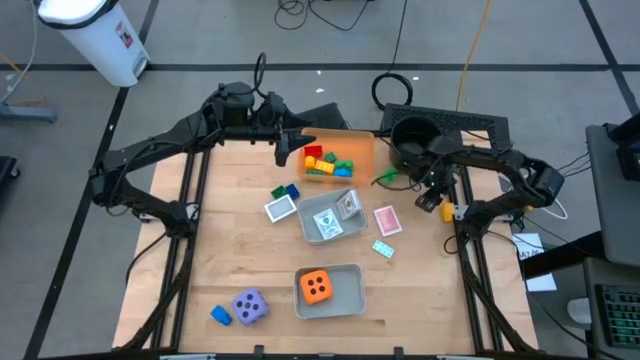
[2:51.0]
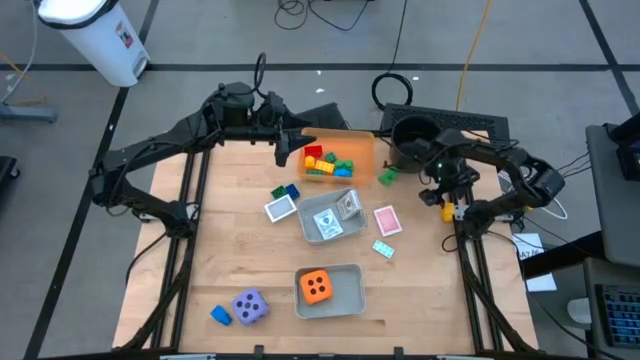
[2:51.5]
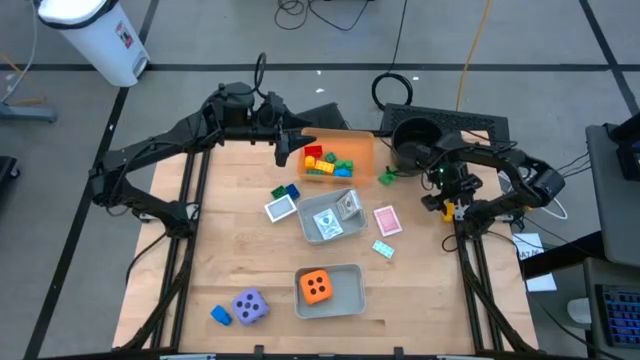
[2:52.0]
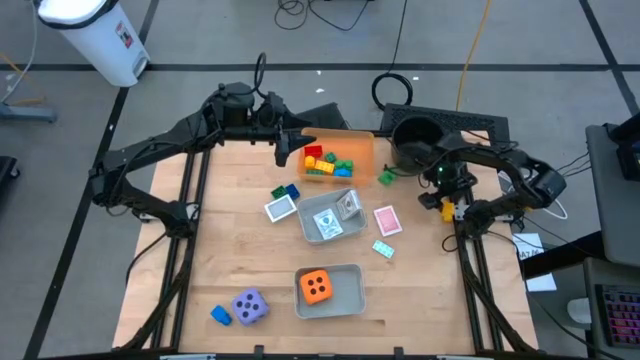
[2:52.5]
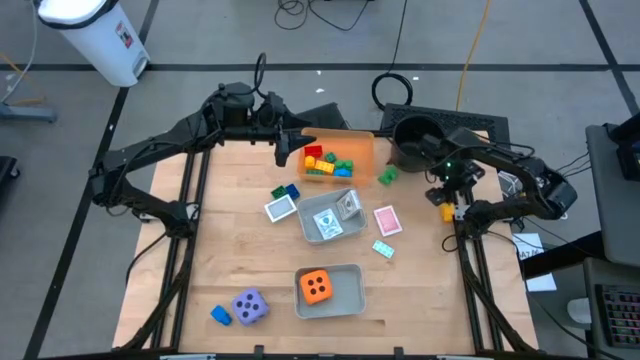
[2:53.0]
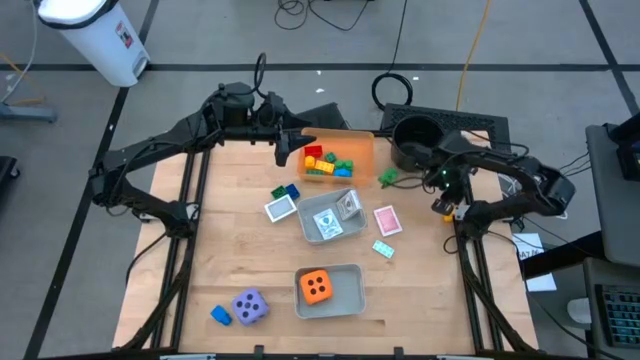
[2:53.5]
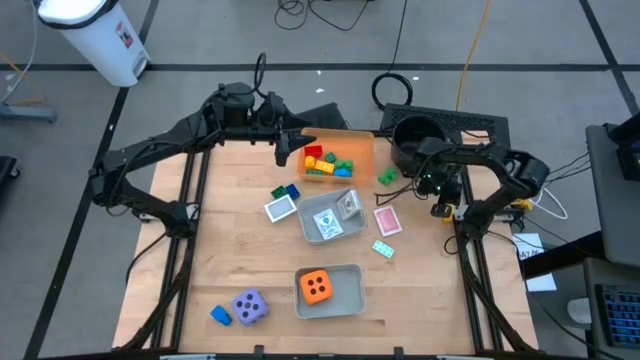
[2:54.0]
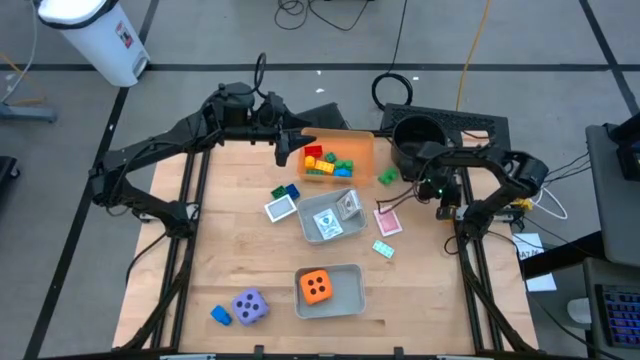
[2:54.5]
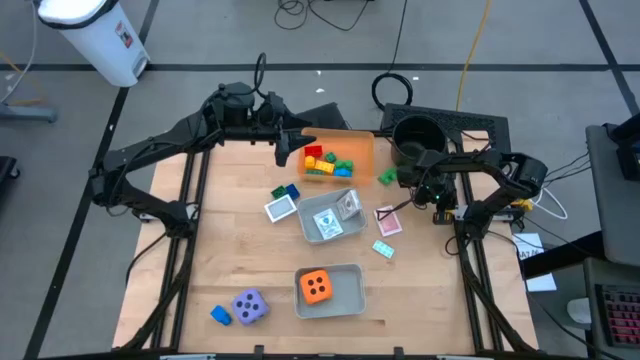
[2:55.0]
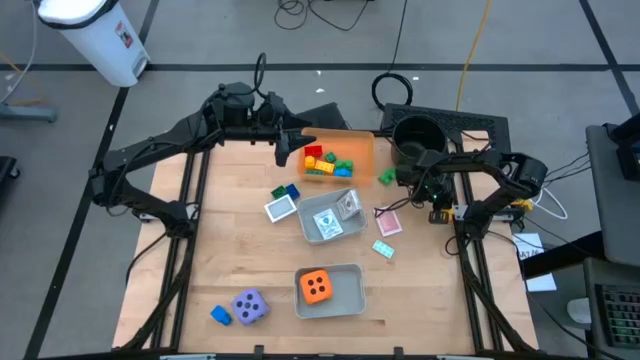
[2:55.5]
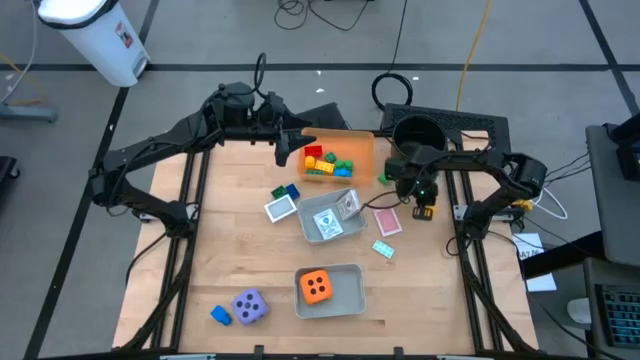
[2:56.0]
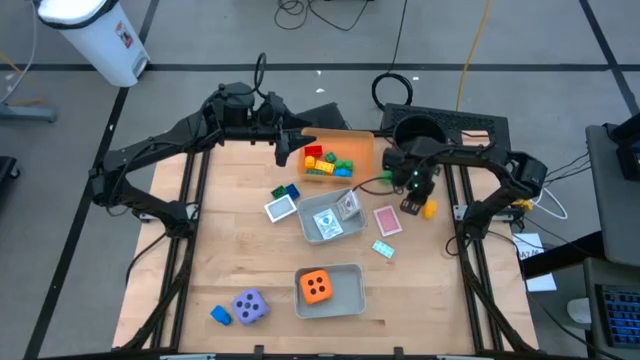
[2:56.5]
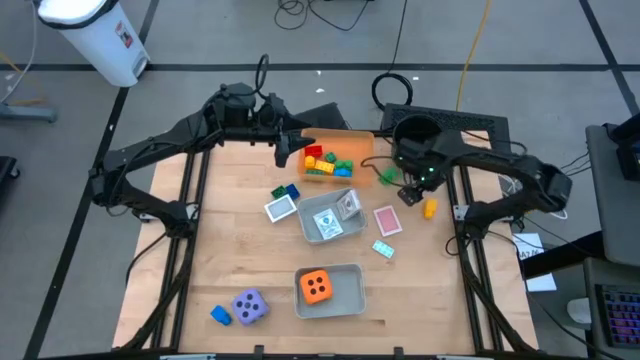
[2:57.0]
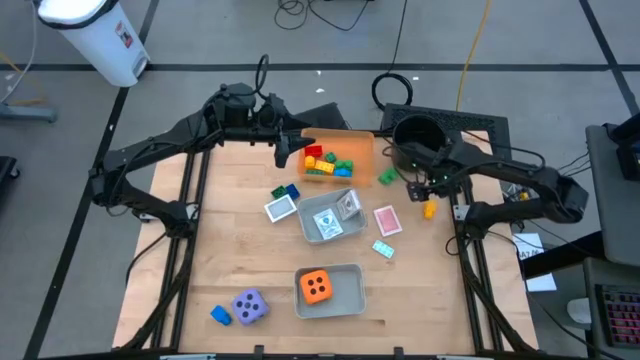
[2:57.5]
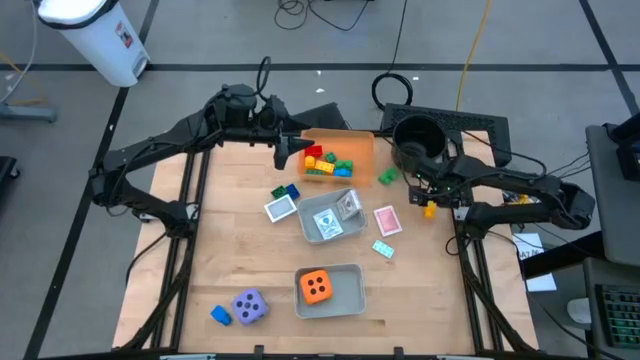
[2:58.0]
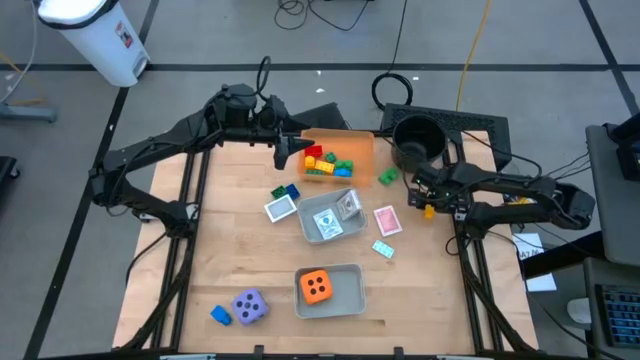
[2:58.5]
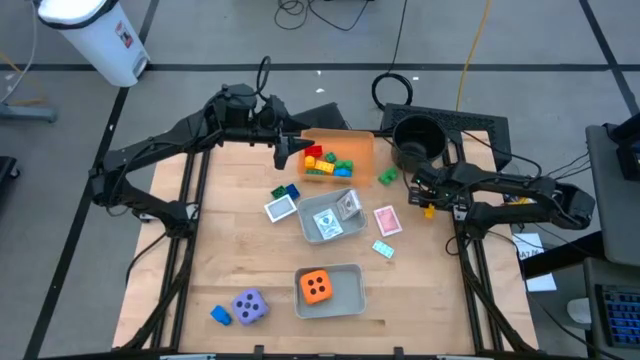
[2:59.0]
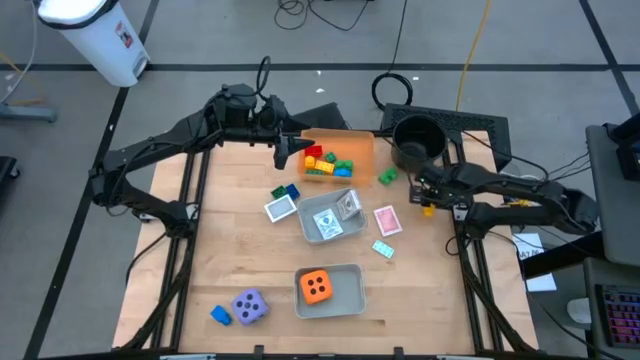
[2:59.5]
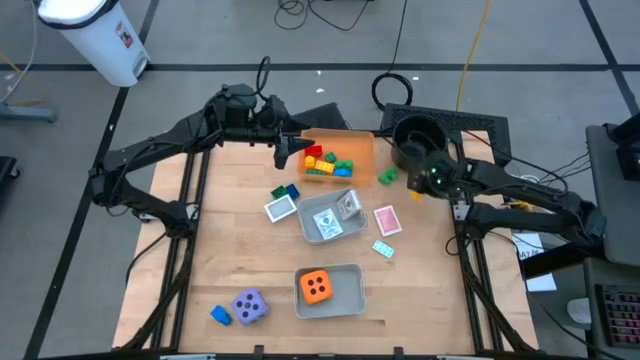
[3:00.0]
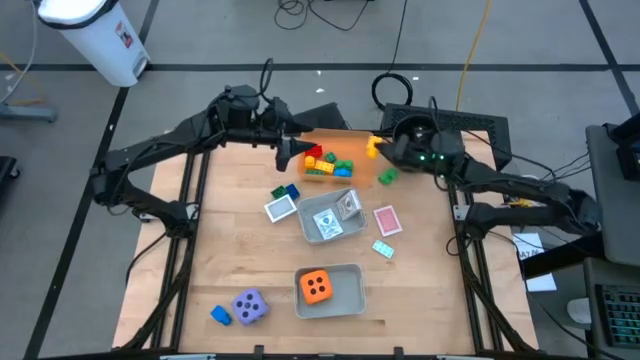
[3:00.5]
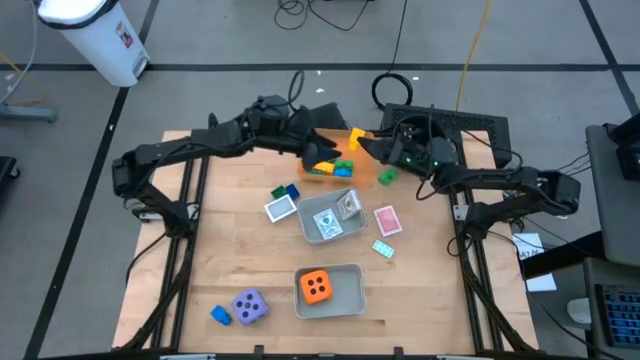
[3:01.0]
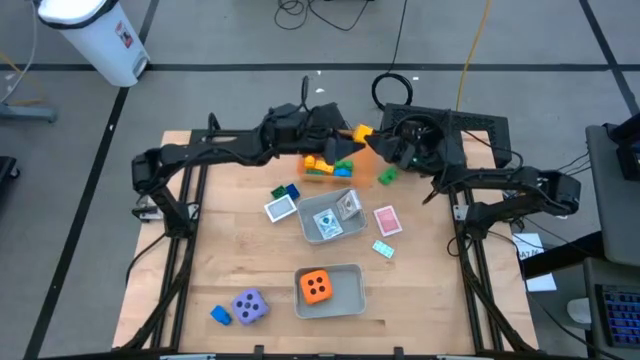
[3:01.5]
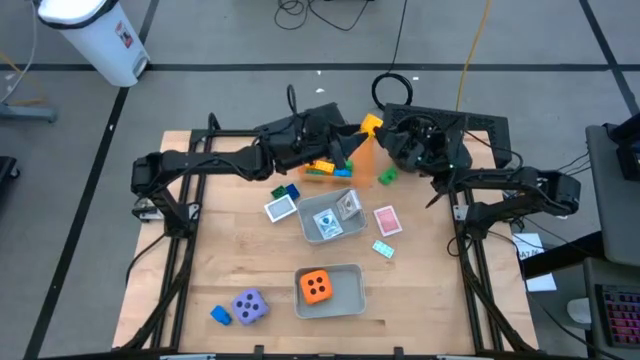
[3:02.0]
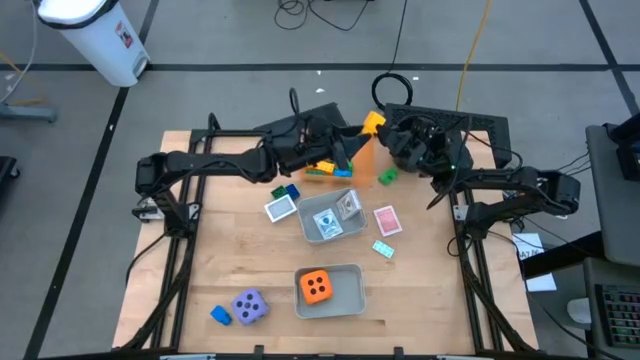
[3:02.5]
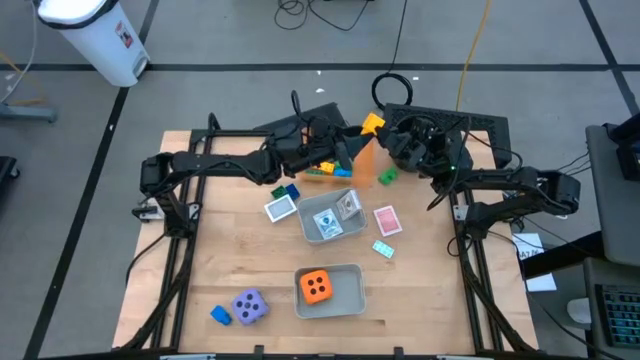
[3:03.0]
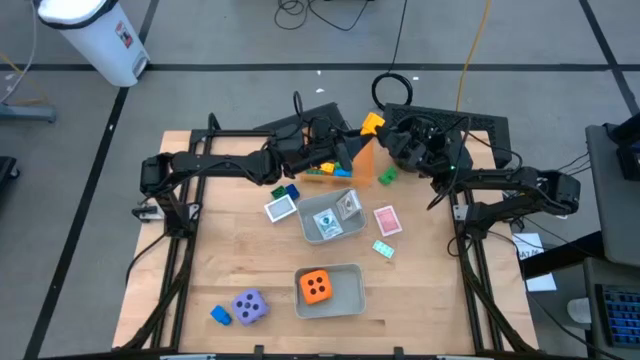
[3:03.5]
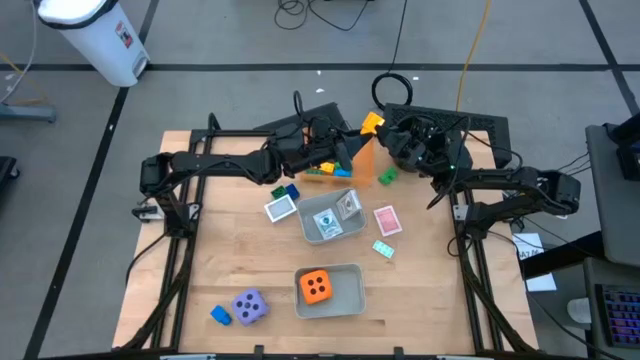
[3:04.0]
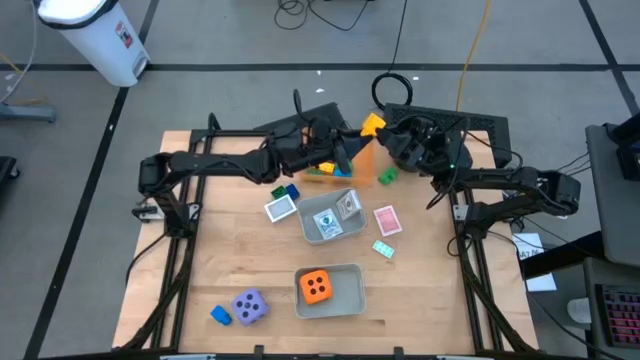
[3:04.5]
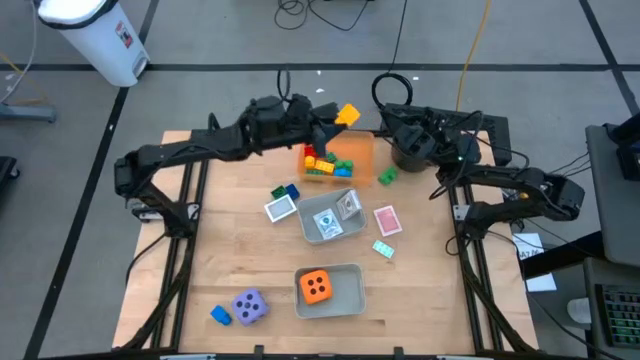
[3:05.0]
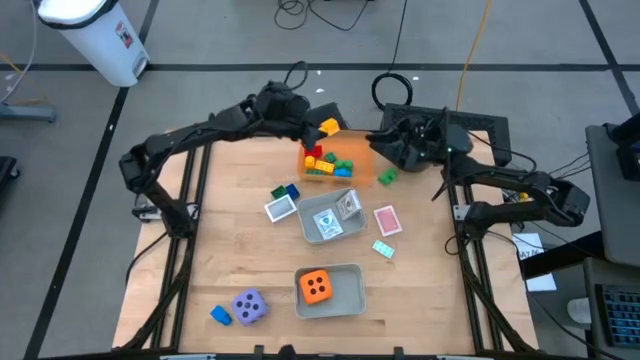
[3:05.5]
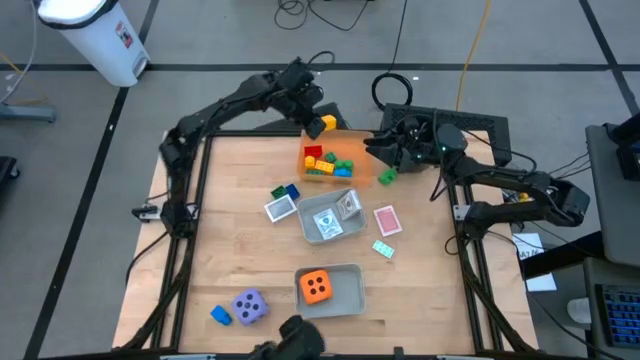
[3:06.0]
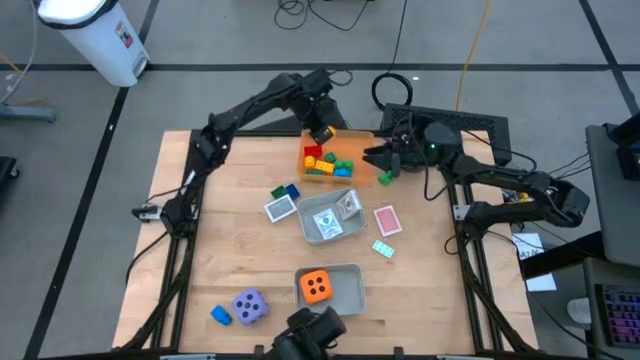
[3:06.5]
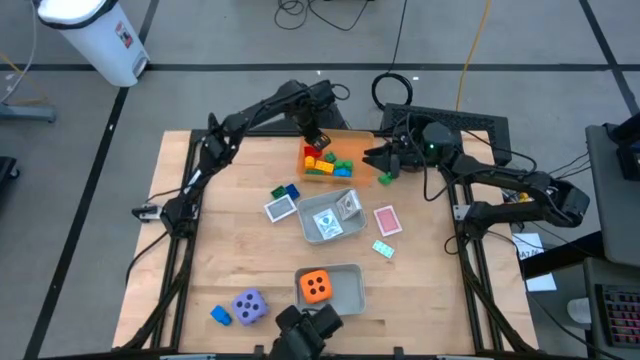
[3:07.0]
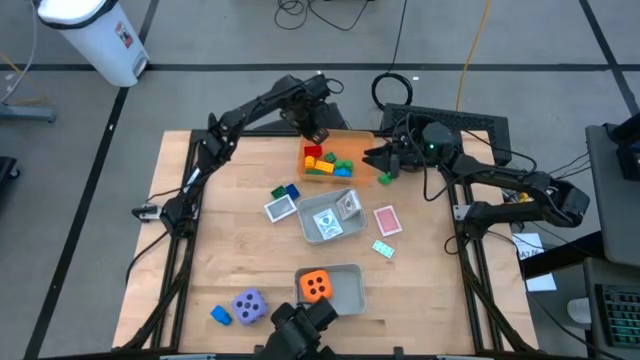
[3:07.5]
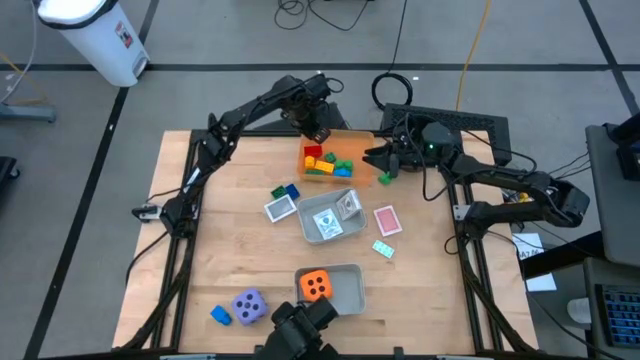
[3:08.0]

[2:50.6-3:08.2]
Task: Pick & Place Toys
Put the yellow game piece into the orange bin

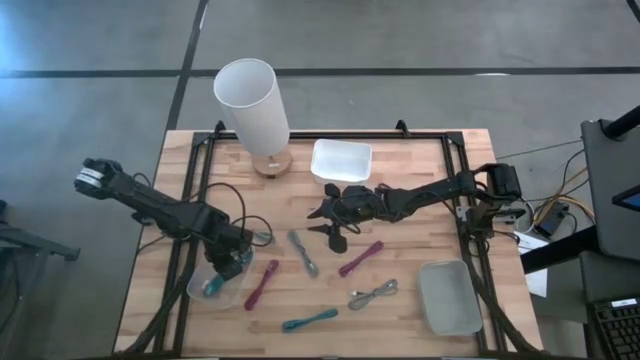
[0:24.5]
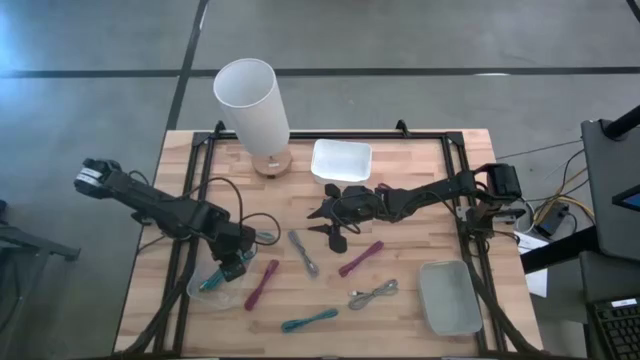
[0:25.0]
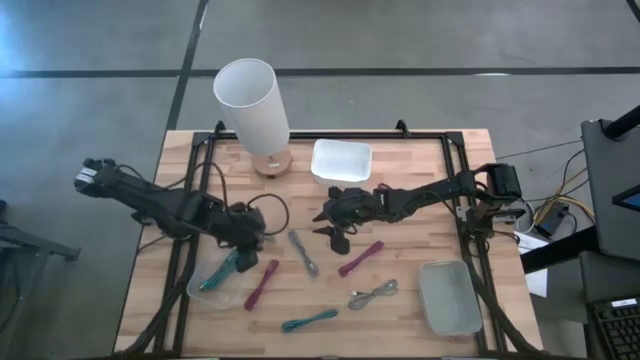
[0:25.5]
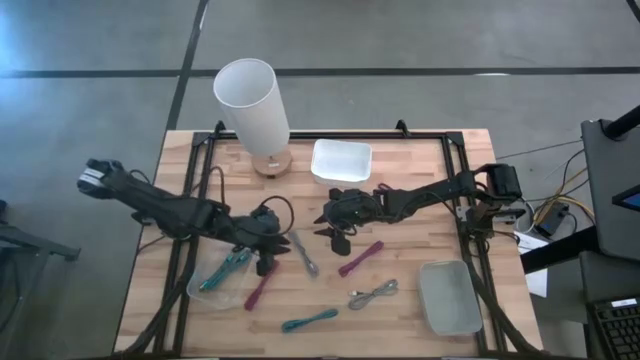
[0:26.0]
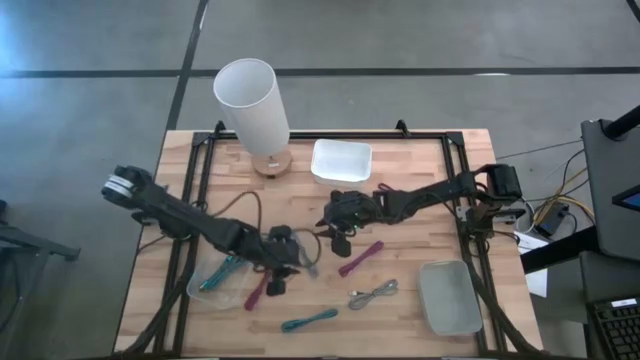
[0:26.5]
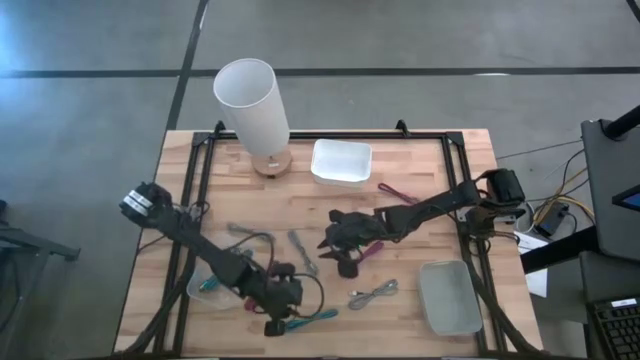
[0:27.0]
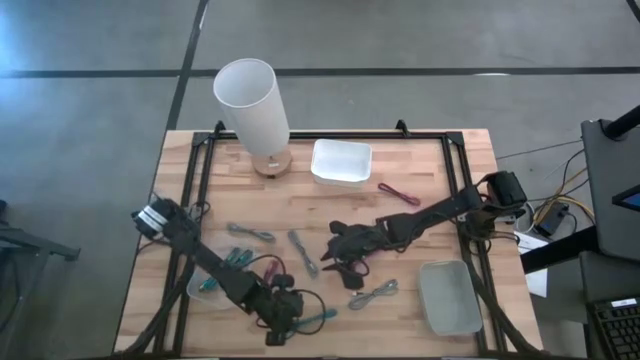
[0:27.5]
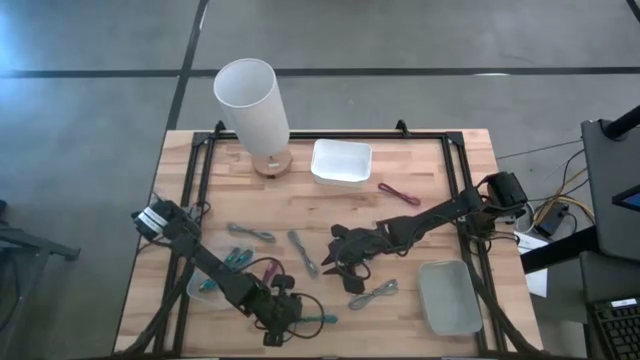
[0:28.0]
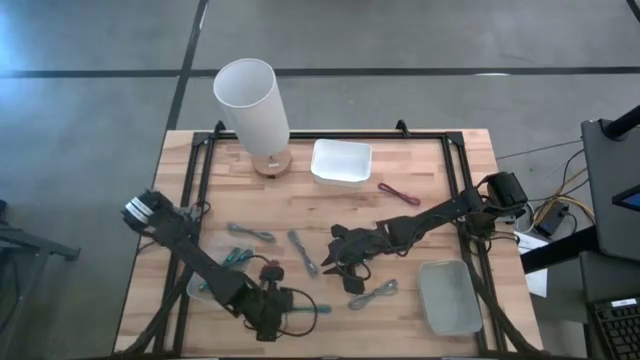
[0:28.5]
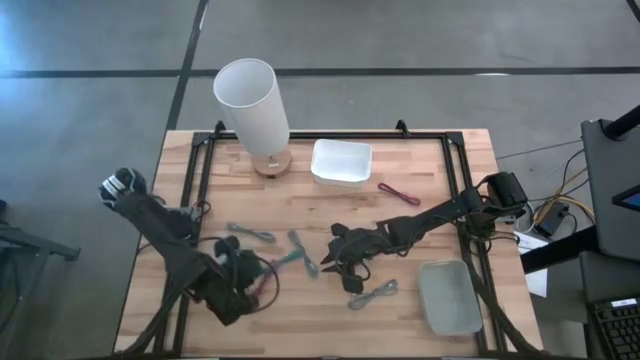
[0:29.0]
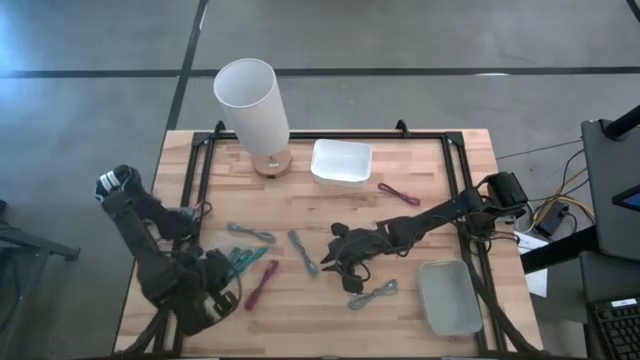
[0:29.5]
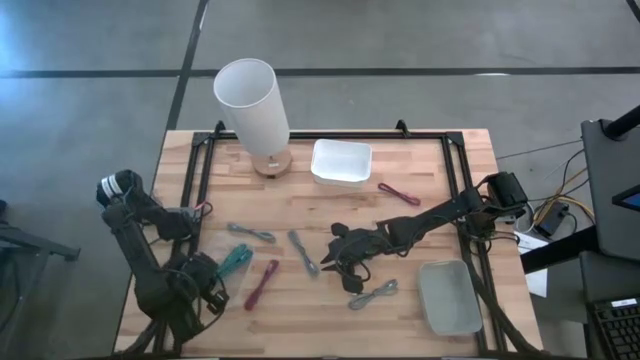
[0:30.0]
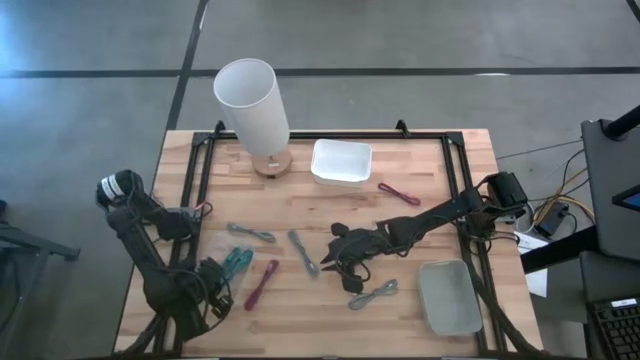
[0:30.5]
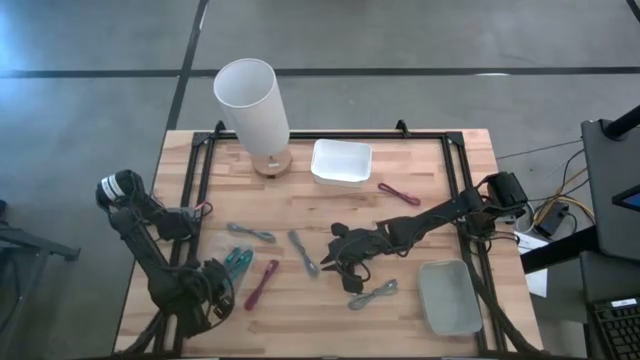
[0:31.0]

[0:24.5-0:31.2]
Task: Pick & Place USB Port
Put the blue black charger cable into the transparent bin
